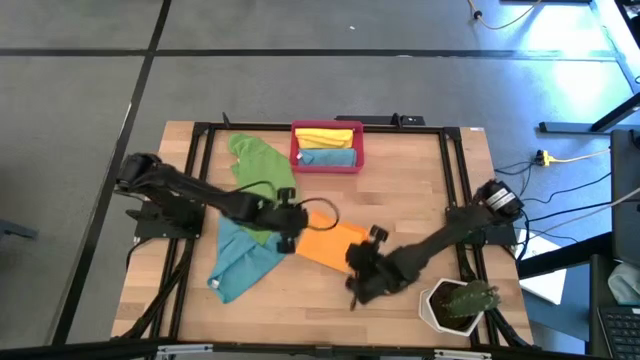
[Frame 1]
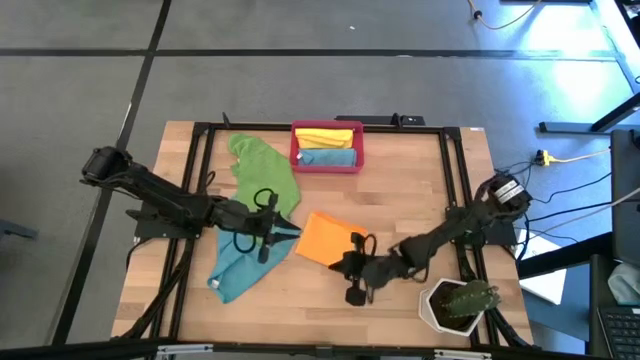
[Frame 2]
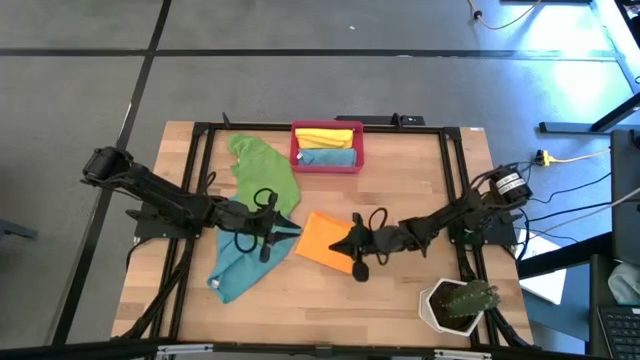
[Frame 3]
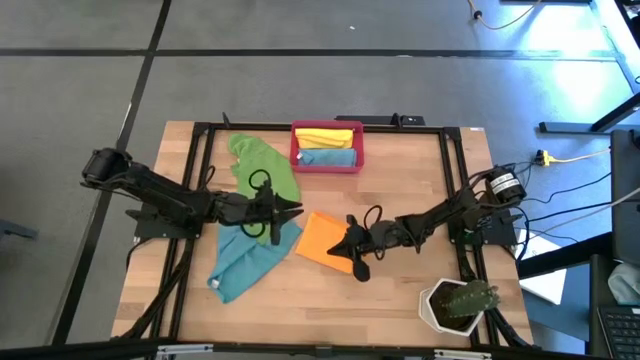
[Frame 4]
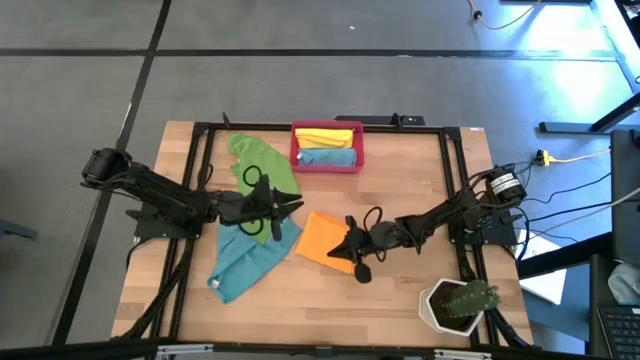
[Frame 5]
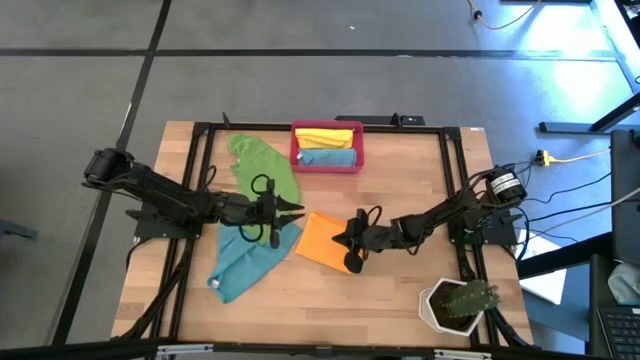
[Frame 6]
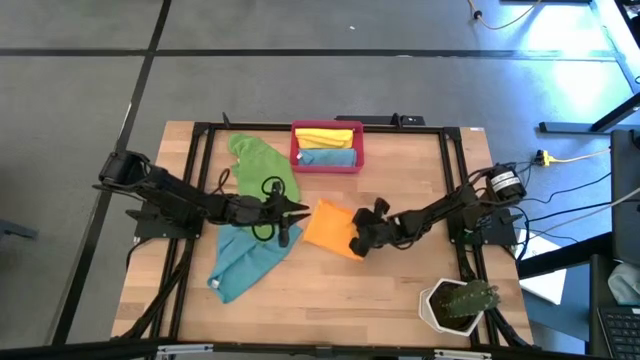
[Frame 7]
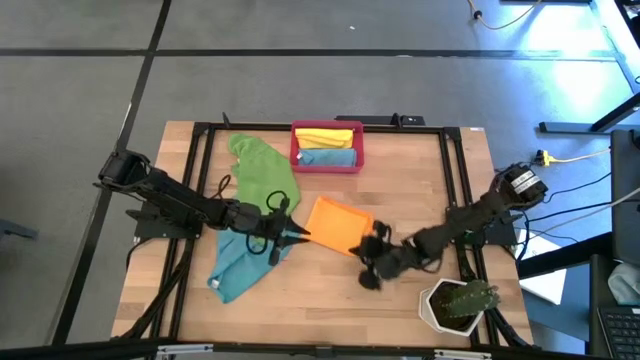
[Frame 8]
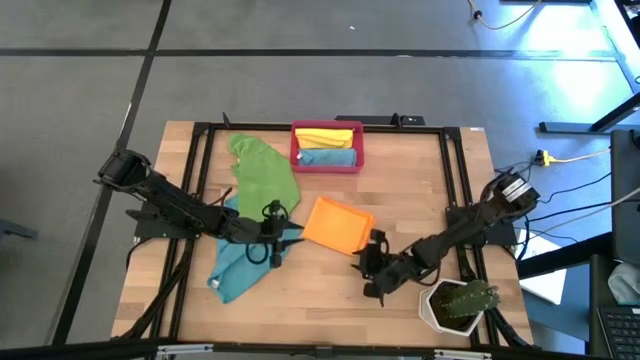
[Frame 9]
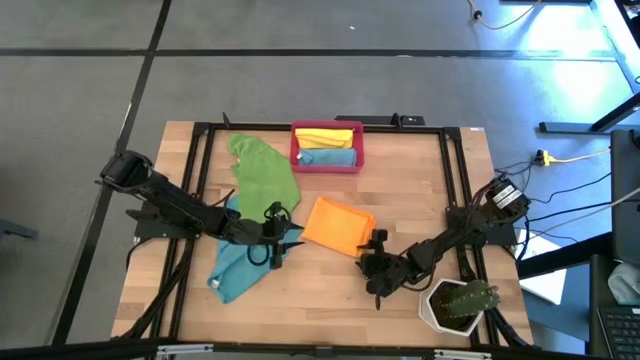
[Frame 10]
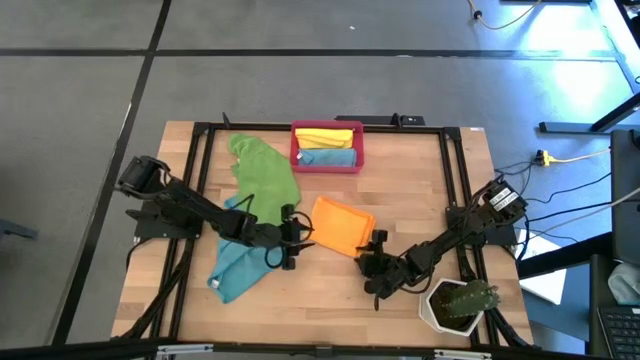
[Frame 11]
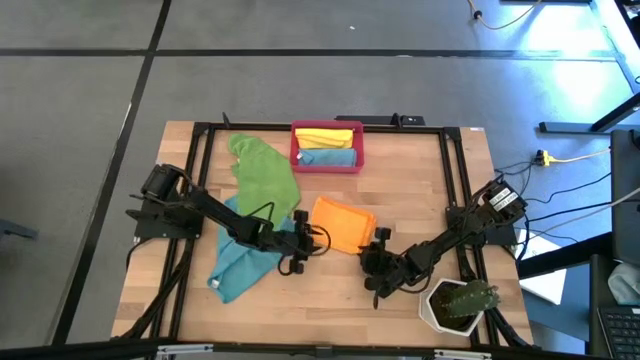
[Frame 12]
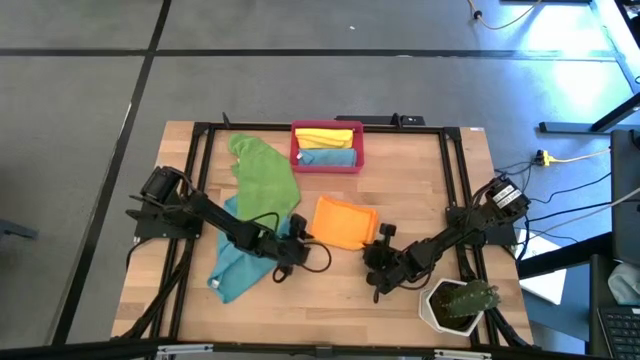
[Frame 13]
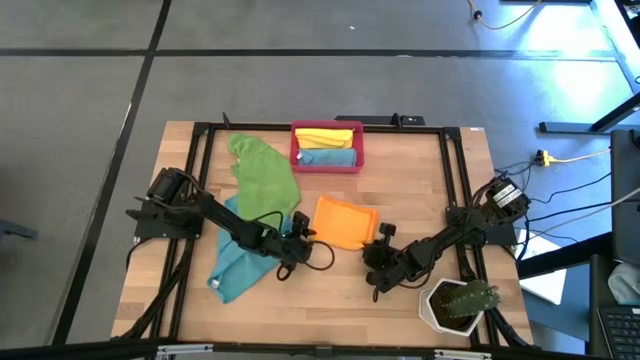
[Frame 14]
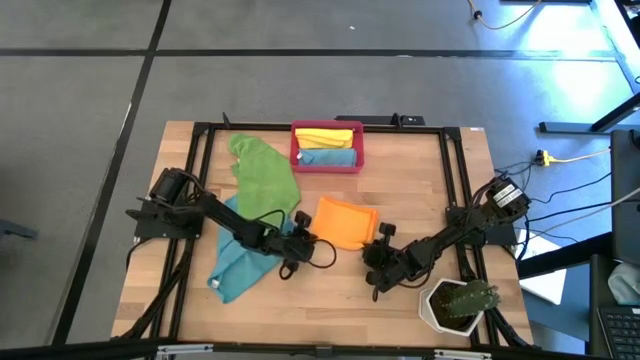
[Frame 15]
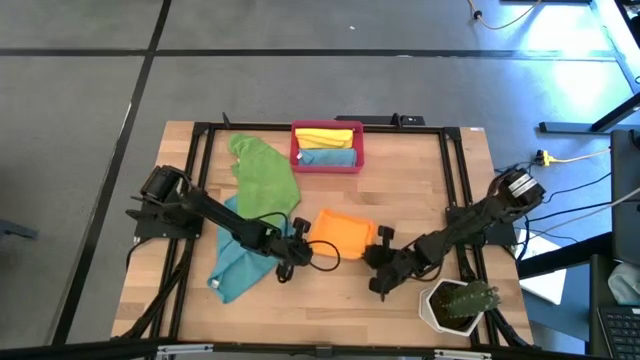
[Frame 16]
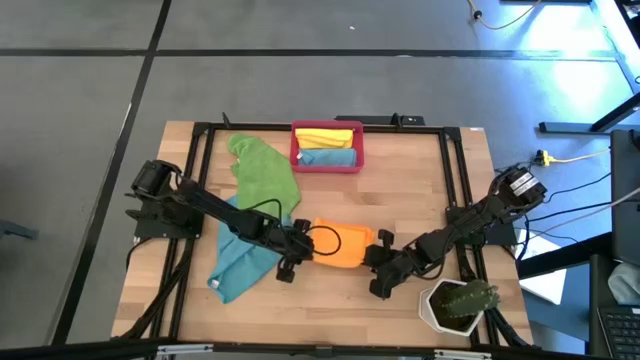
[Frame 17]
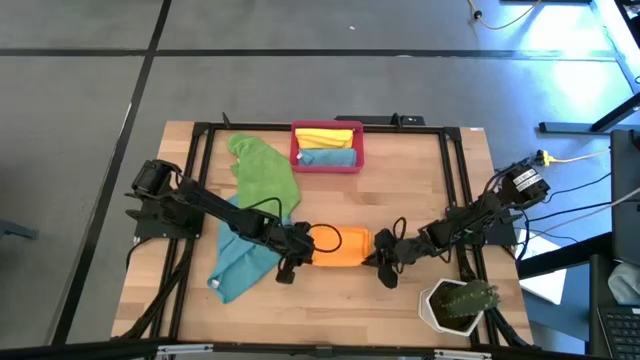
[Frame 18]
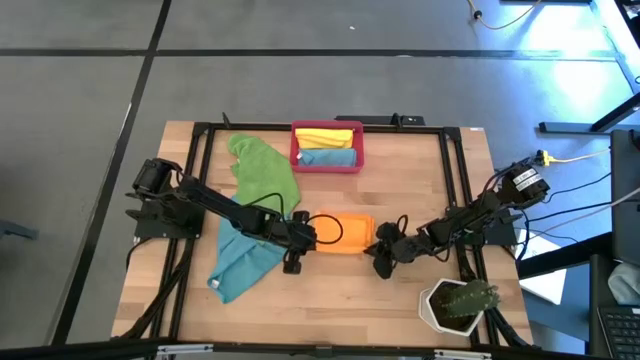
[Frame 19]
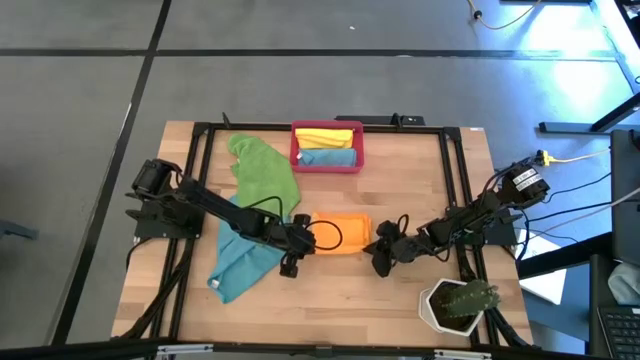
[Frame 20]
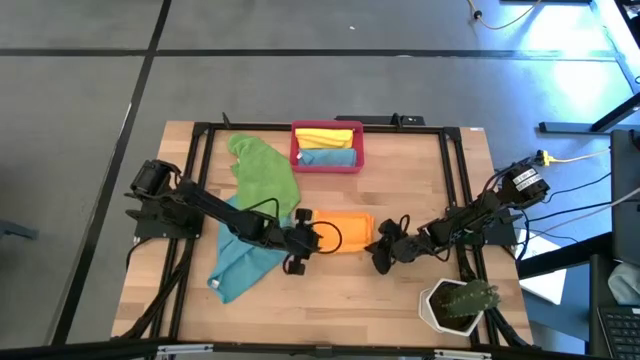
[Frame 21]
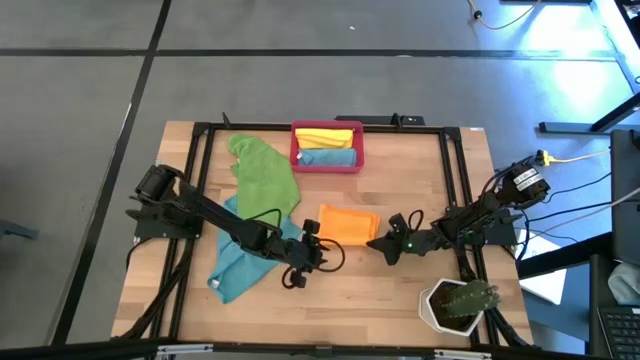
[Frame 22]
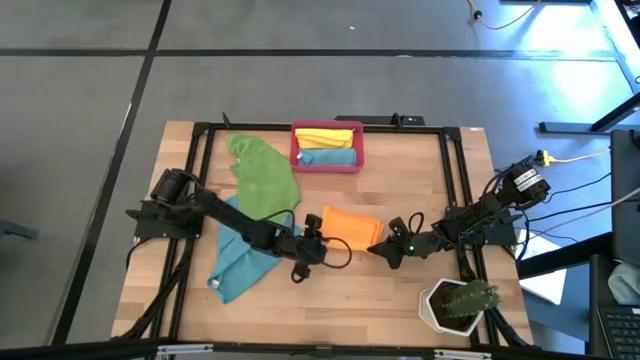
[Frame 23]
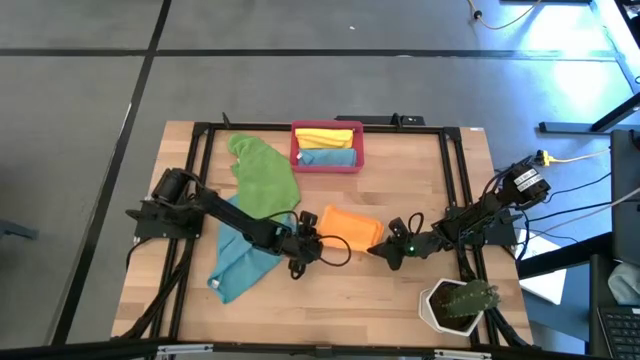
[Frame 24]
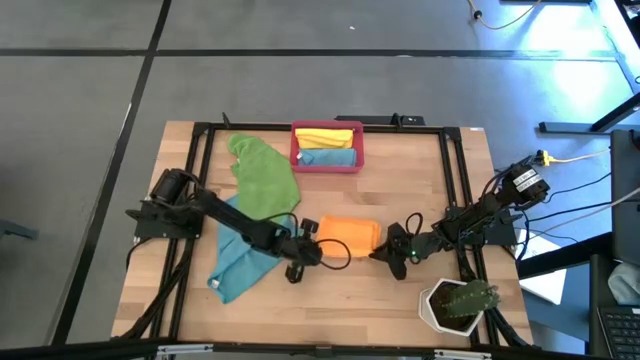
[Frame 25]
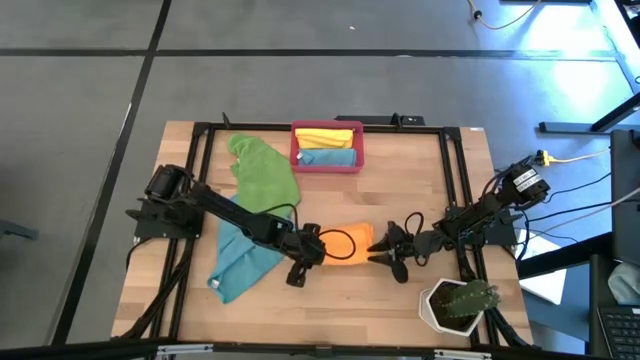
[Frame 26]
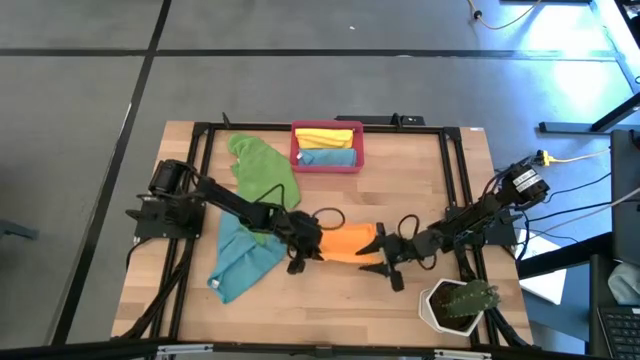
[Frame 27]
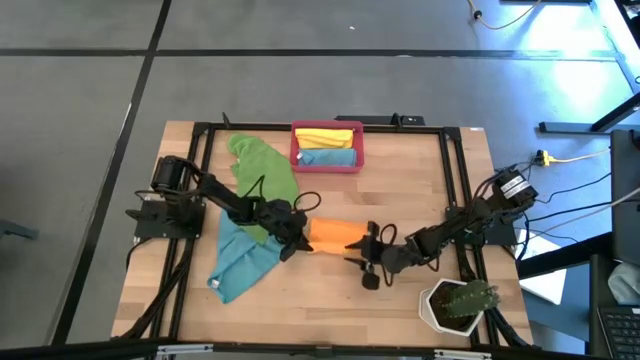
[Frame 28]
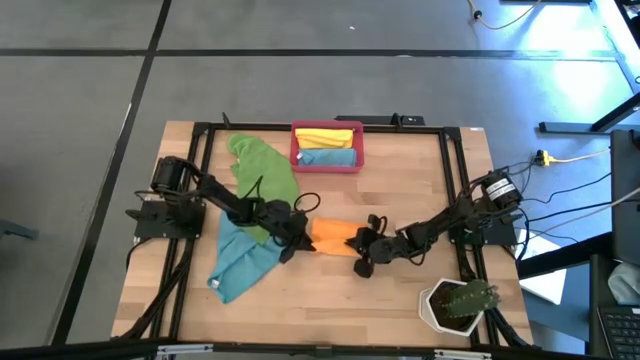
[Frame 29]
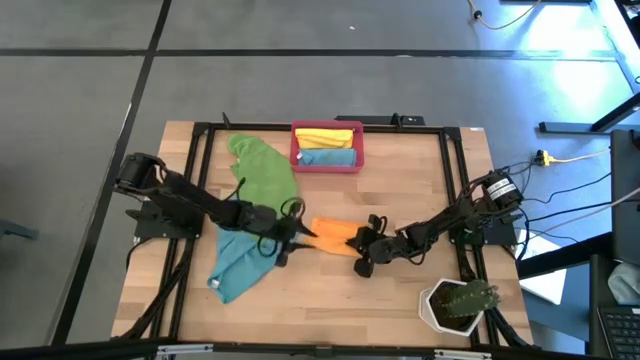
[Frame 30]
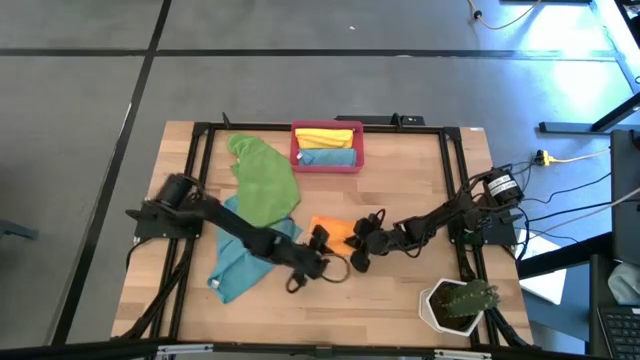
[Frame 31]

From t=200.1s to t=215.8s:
Task: Roll microfiber towels into tight, uniform cylinder then place into a basket
Roll the orange microfiber towel

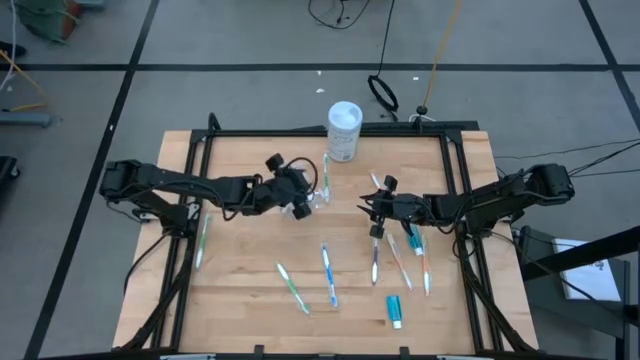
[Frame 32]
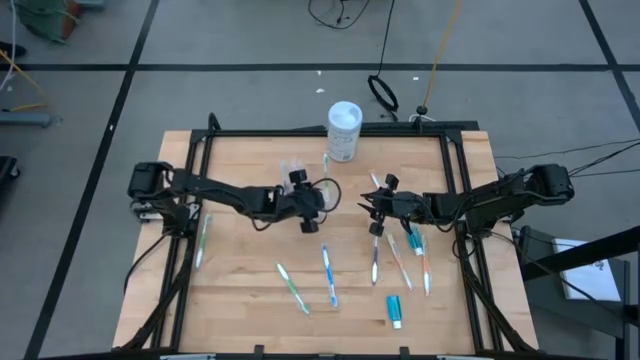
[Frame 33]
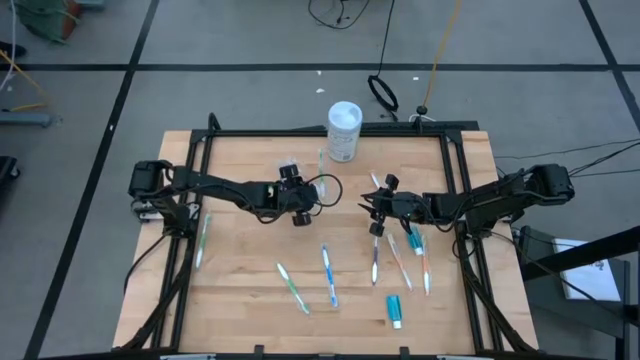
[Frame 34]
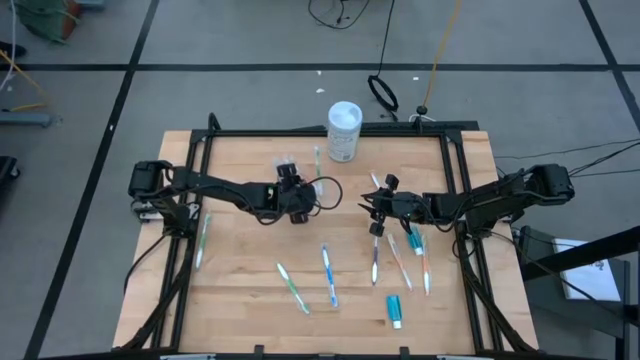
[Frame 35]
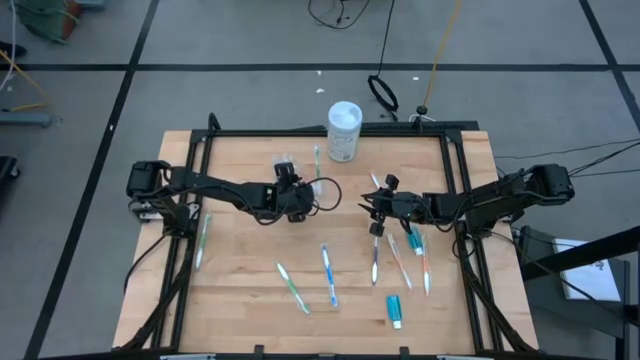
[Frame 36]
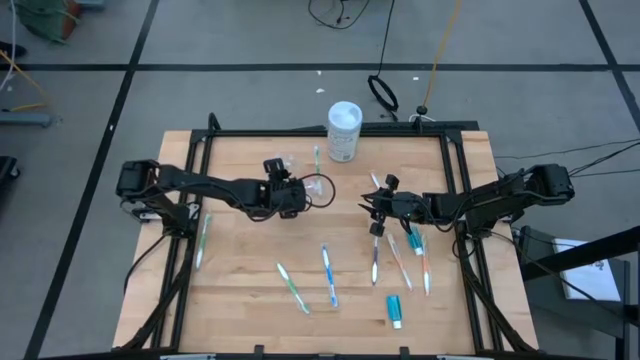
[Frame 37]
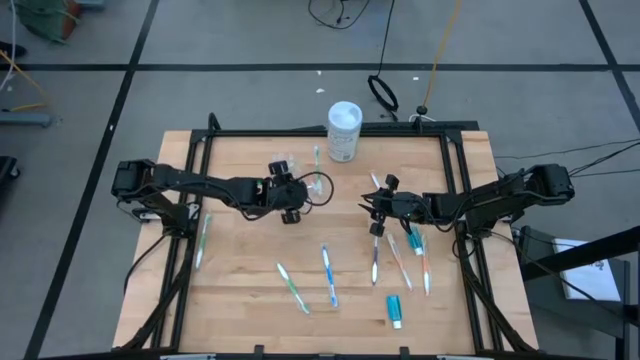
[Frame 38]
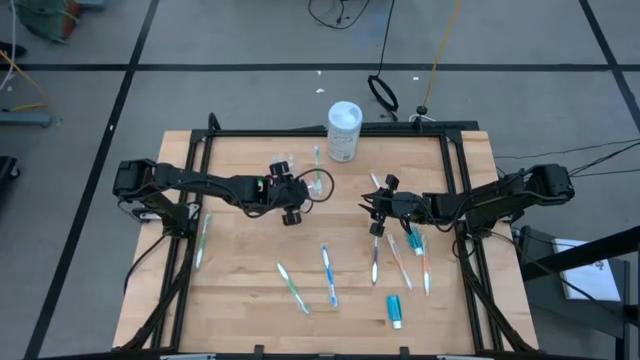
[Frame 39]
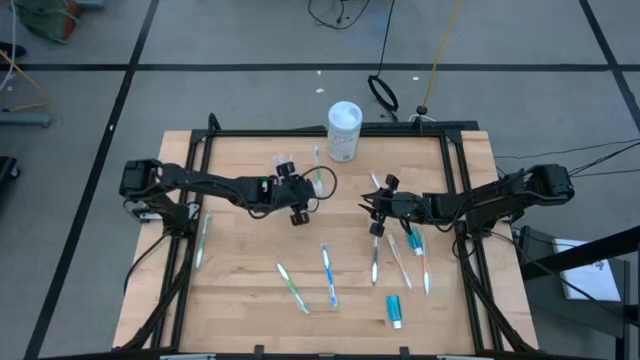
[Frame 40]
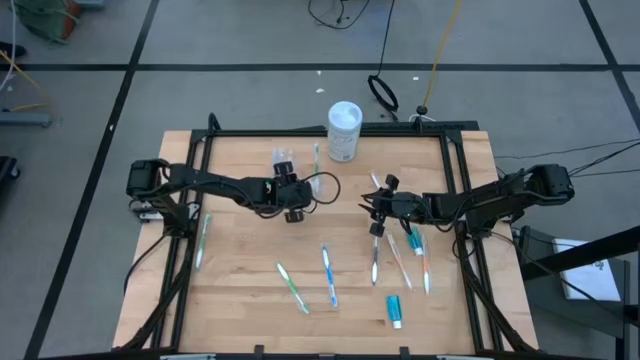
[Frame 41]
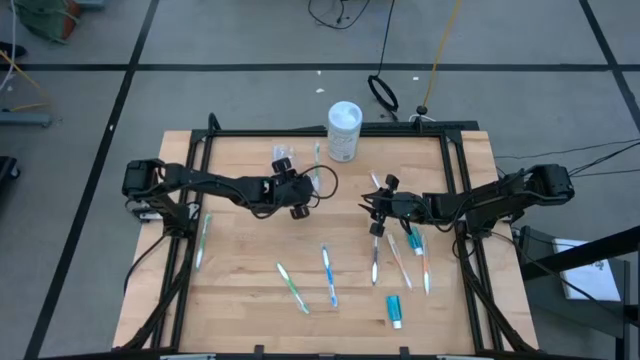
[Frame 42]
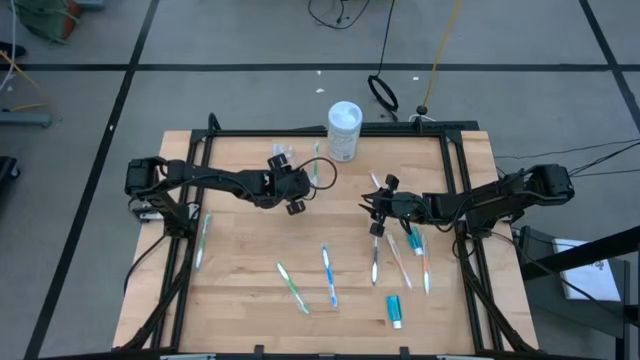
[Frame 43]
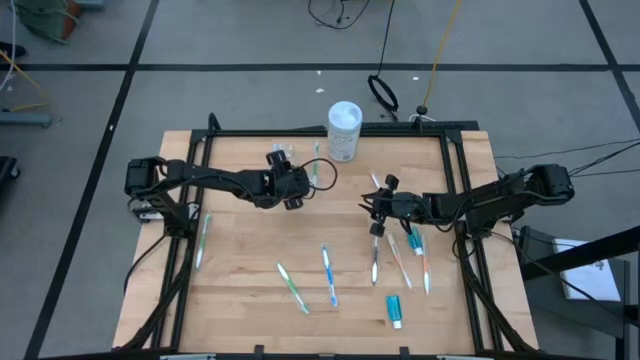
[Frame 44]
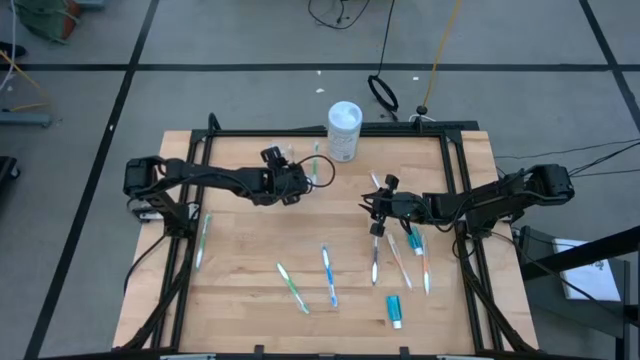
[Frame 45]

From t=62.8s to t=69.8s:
Task: Pick & Place toothbrushing station
Adjust the blue mouthwash in the transparent organizer
